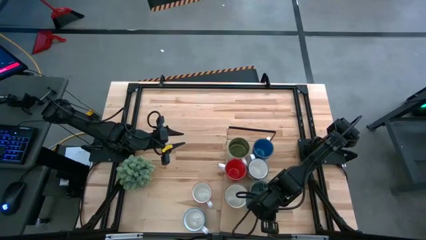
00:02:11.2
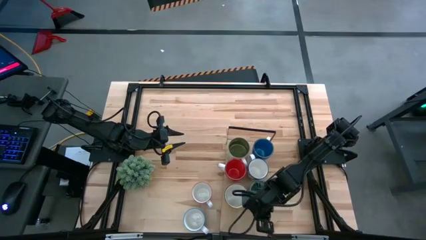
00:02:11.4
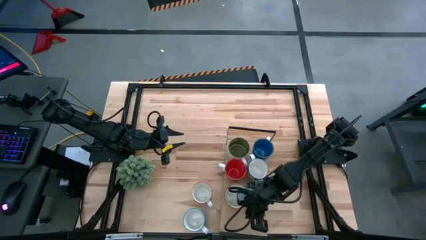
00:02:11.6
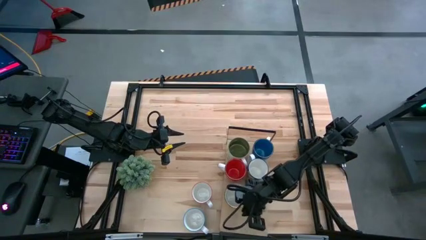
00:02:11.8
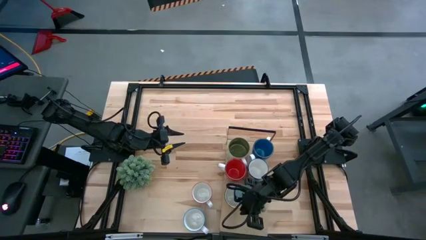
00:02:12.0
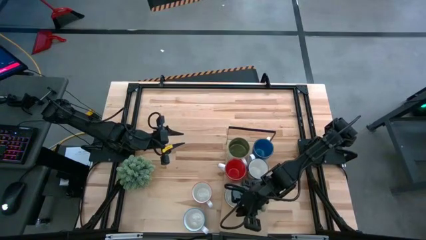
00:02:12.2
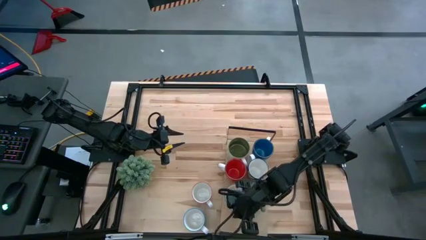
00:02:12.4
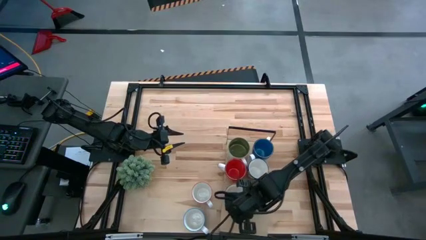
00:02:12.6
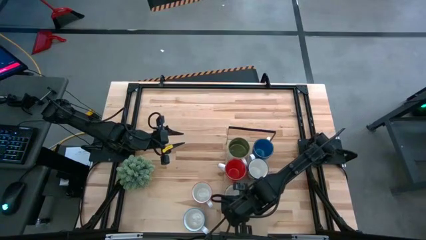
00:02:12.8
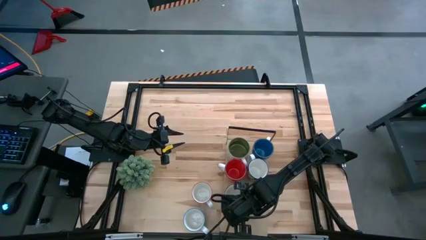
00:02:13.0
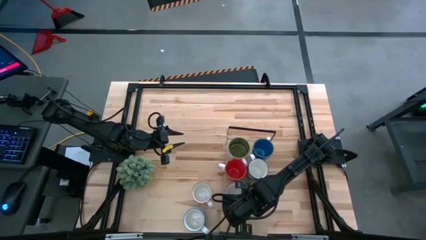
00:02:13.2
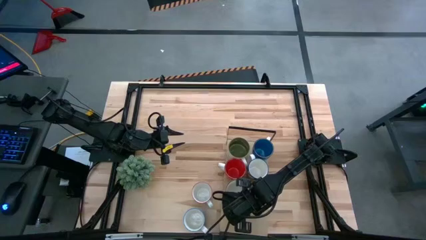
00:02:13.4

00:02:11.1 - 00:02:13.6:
Task: Place coffee mugs
Adjust the yellow mug on the shelf

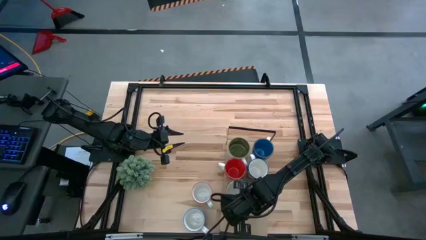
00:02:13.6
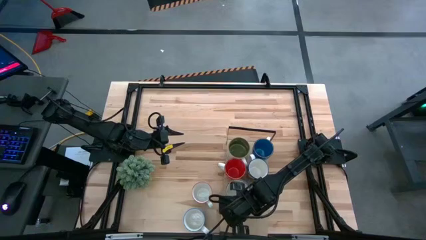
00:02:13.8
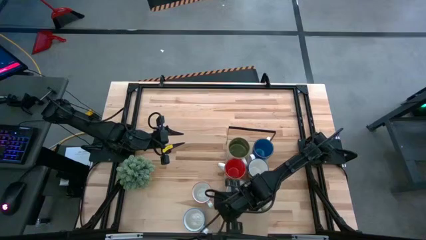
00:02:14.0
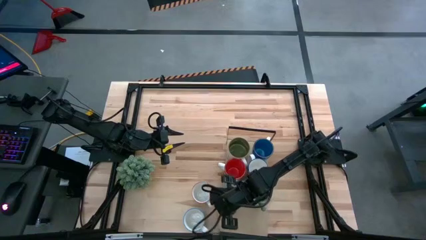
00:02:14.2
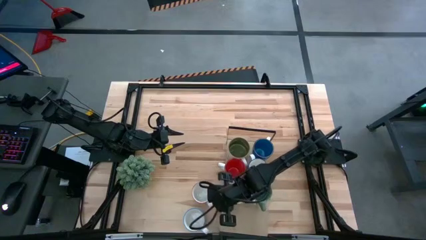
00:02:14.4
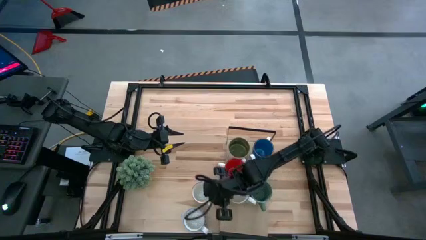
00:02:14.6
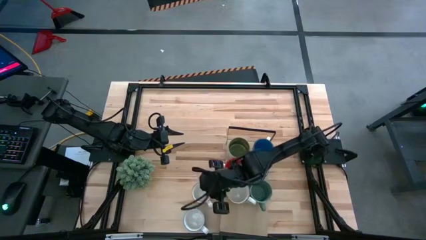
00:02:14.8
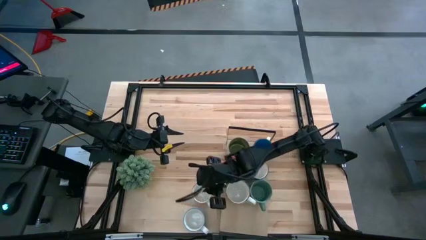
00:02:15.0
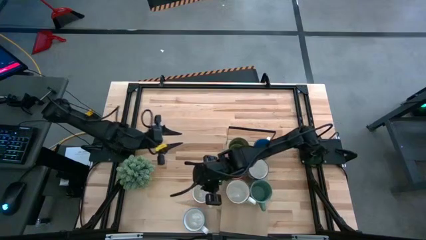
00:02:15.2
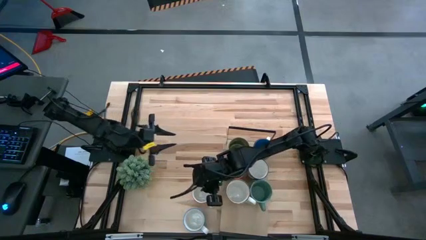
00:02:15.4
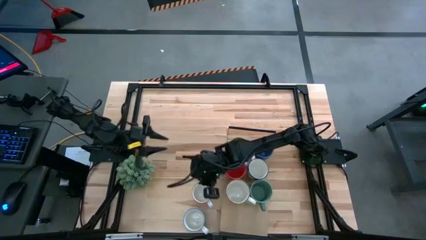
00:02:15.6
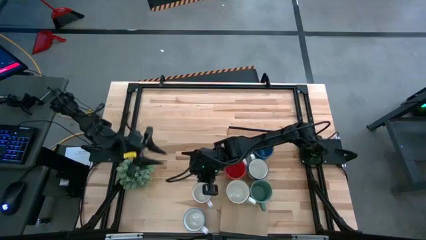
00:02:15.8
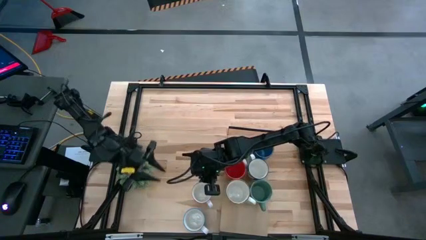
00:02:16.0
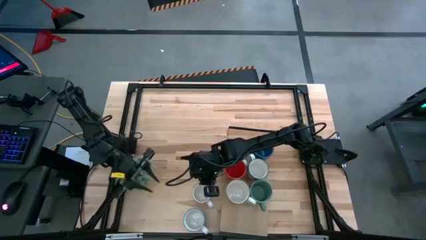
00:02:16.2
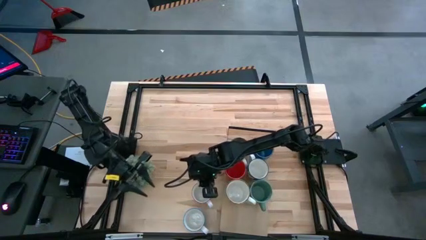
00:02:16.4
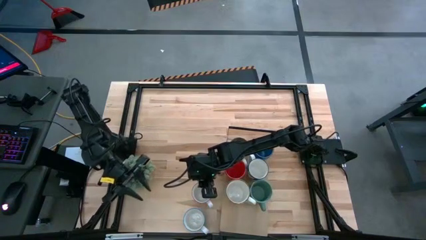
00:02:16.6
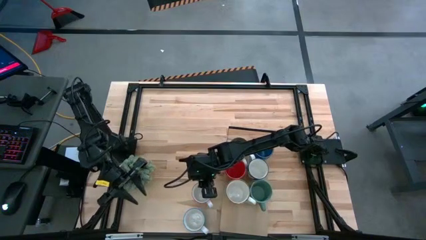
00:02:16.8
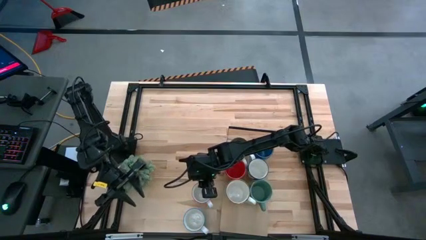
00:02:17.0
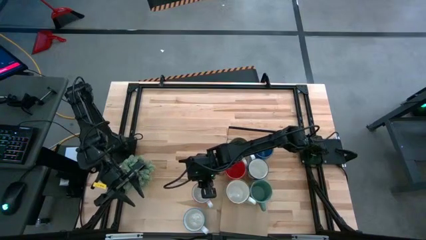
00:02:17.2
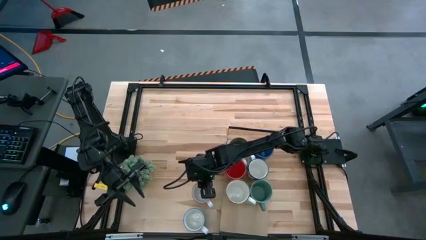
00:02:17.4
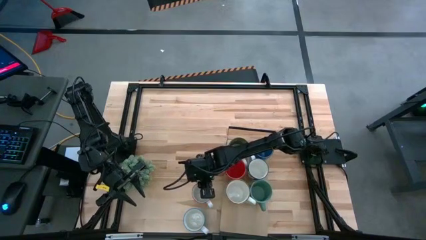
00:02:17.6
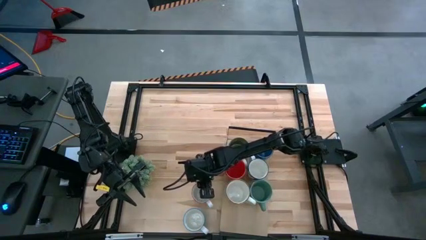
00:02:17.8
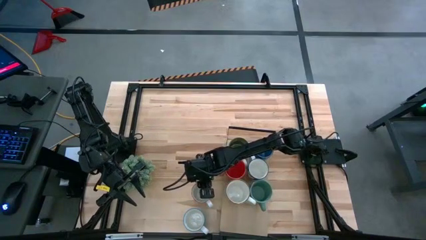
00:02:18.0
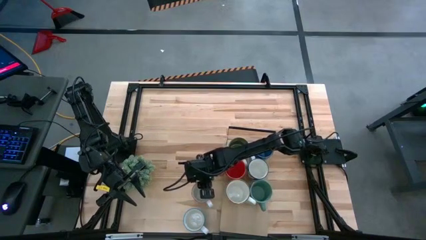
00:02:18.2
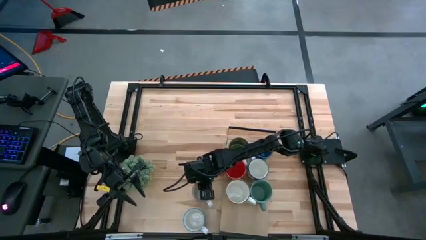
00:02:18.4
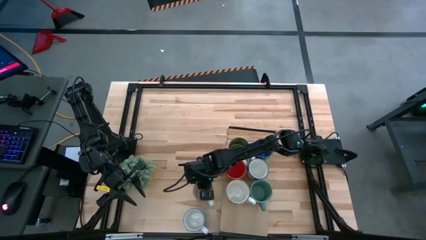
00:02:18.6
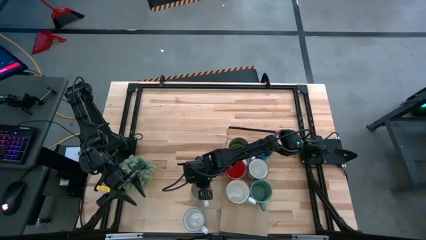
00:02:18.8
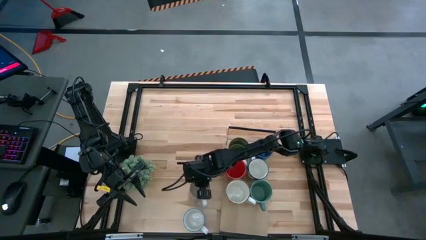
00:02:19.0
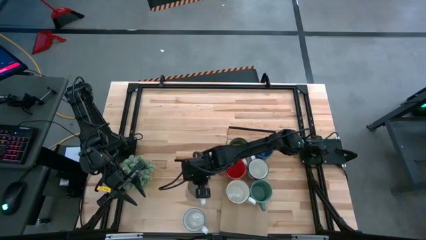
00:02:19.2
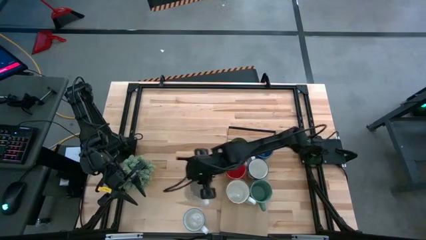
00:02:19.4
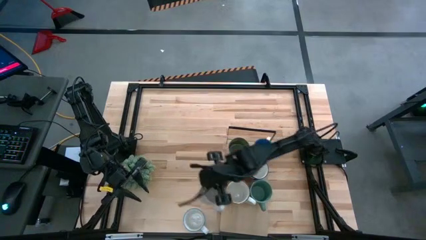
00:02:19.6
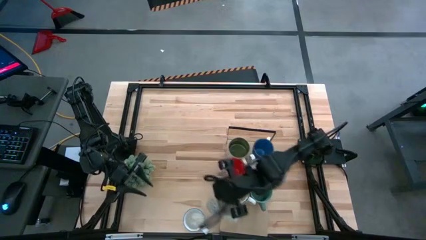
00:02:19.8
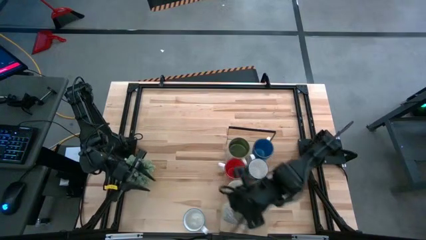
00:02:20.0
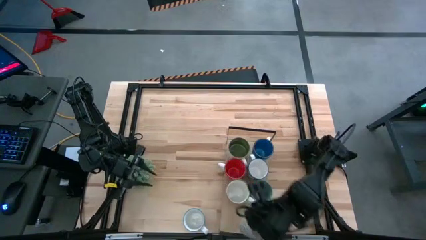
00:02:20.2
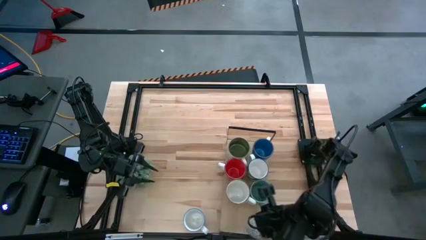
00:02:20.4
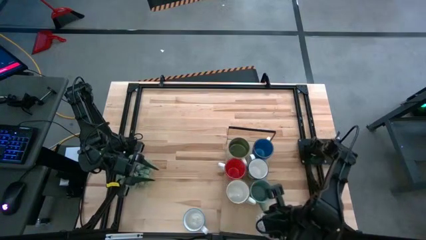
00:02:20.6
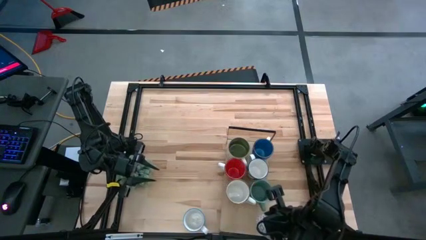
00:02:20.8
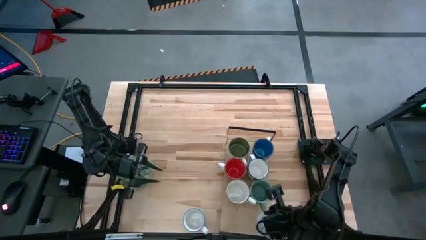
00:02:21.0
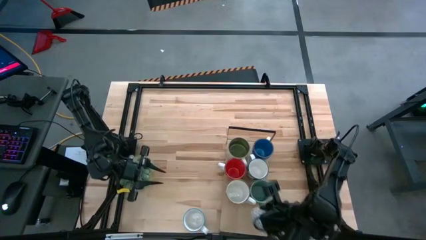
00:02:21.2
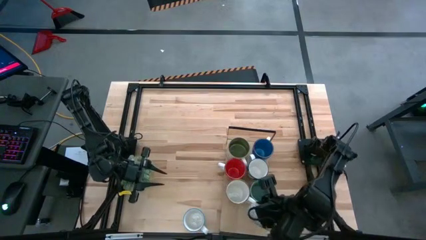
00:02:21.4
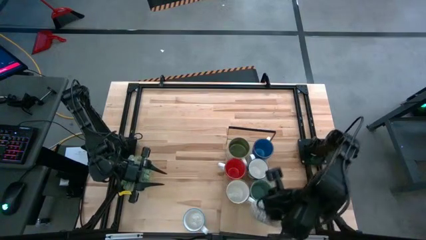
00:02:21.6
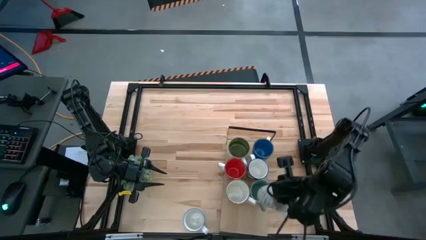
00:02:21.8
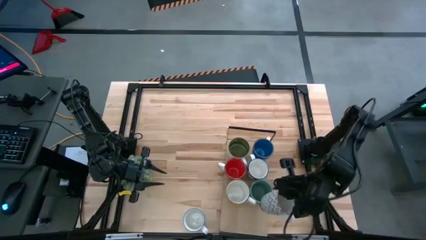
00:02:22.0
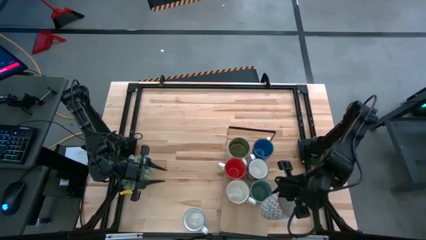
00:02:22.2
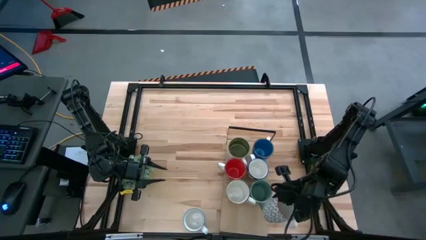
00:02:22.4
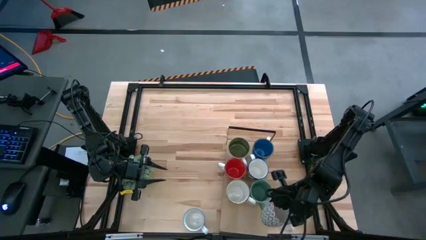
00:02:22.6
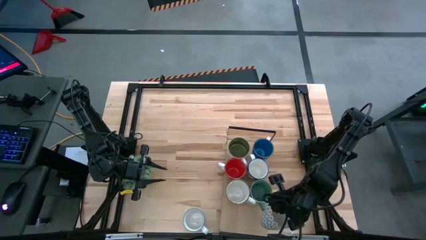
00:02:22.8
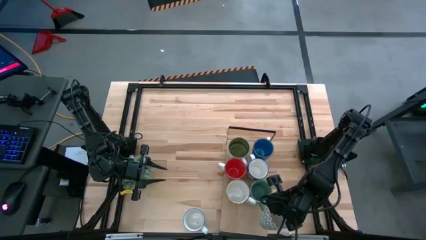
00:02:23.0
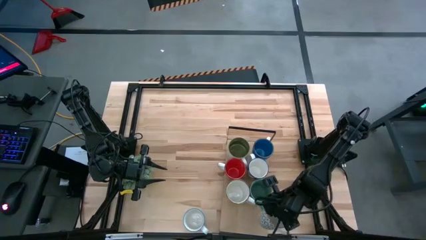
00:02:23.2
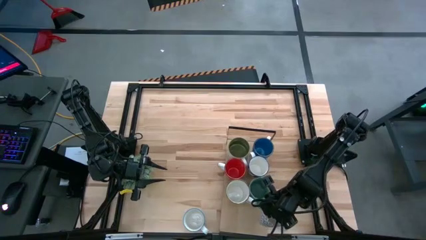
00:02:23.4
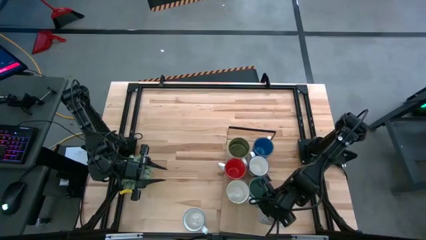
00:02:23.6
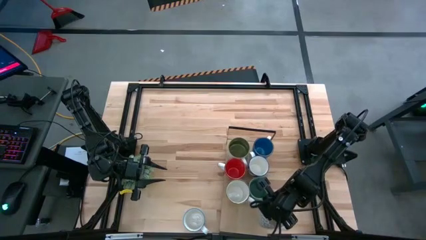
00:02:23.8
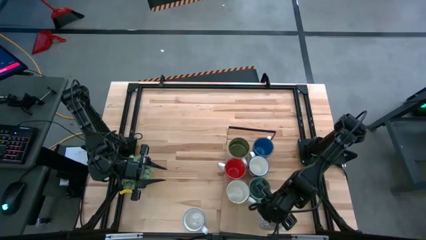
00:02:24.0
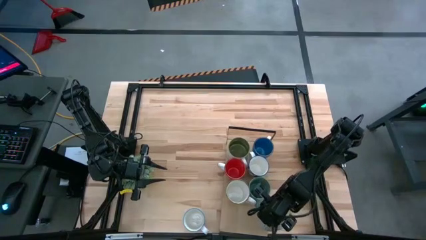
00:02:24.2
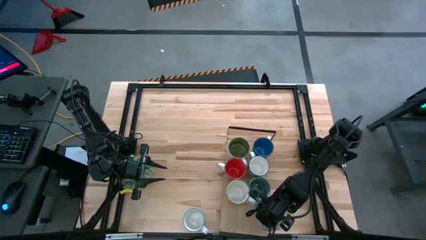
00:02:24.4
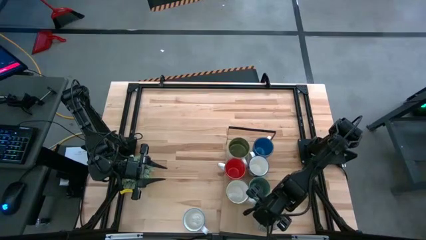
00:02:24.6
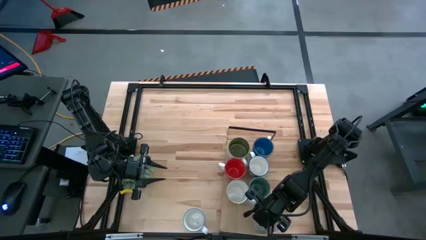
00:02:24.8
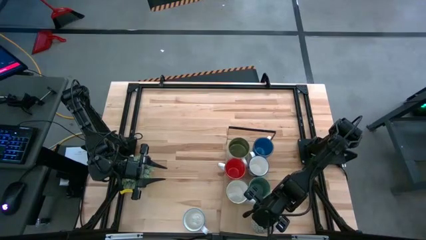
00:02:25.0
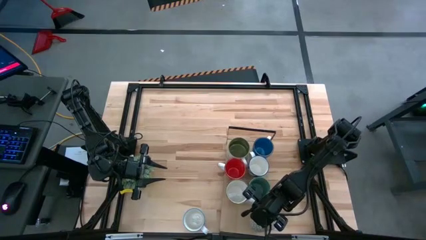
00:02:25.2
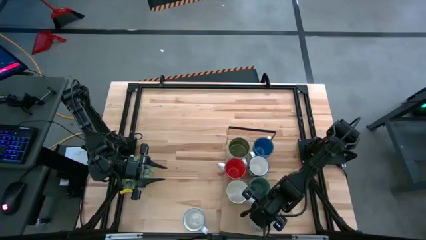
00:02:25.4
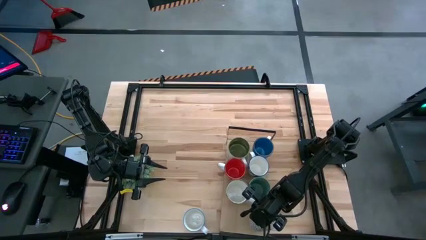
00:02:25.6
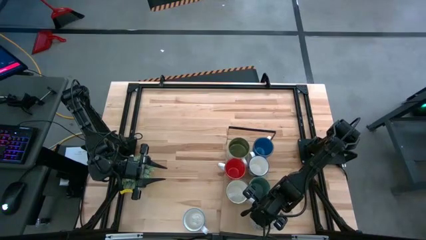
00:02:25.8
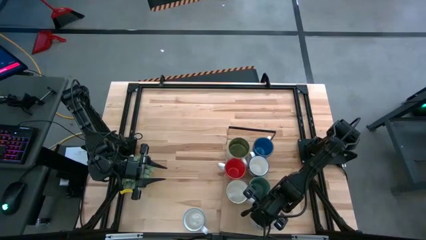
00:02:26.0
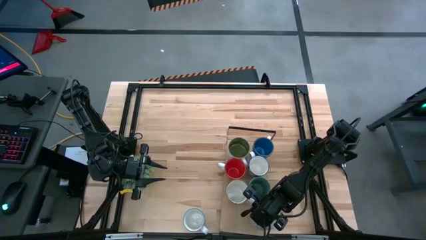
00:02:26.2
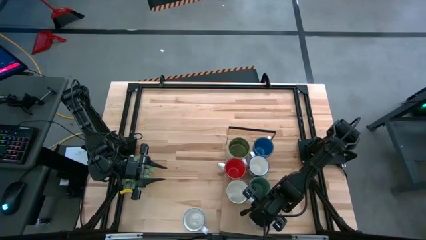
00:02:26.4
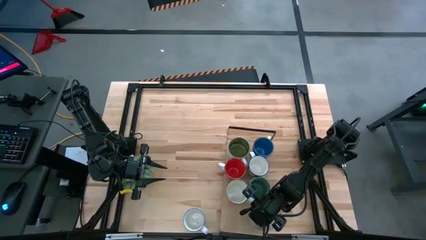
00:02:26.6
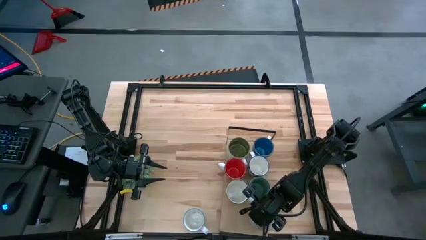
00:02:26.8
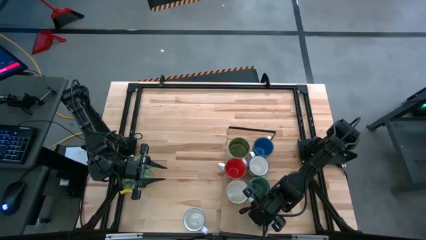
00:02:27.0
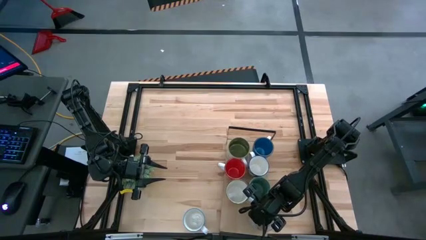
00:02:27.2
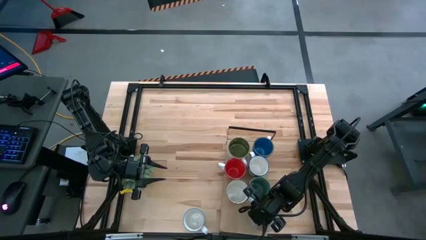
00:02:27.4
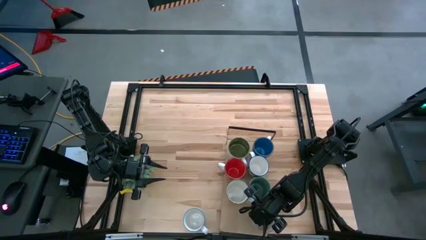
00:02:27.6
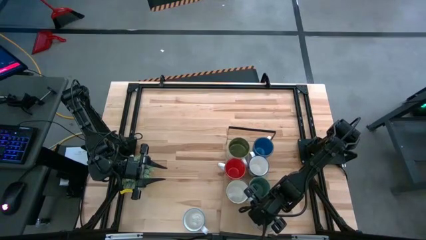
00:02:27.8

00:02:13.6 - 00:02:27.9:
Put the gray and white mug on the shelf
